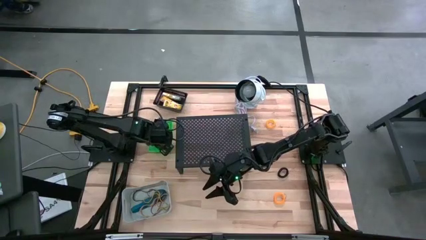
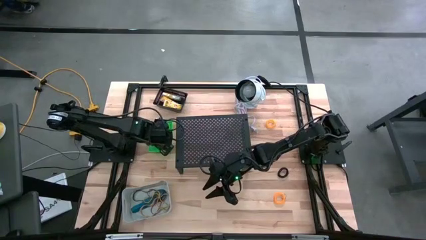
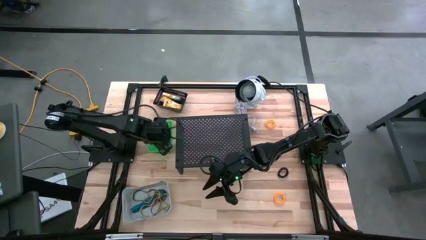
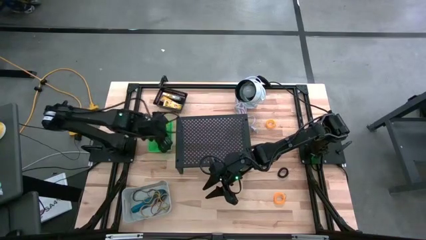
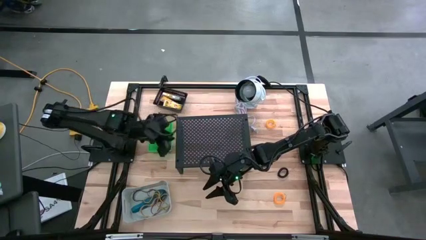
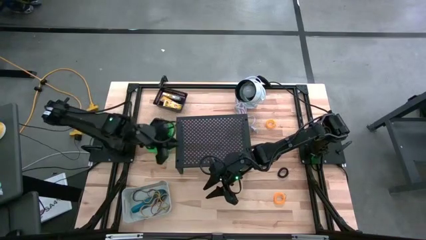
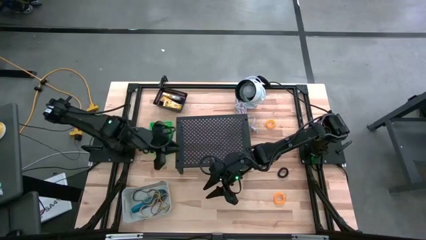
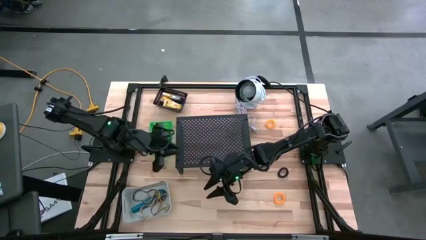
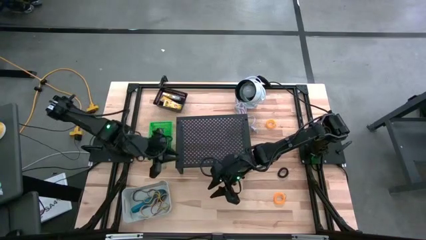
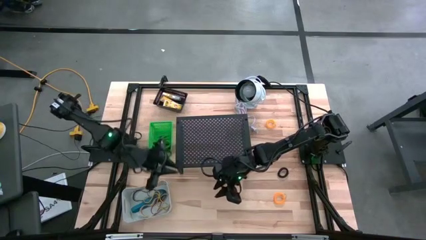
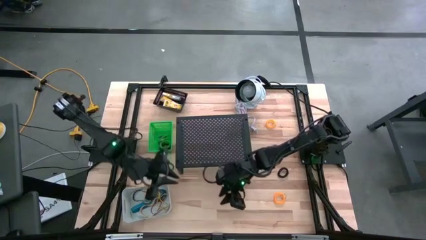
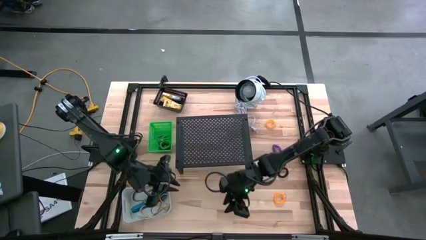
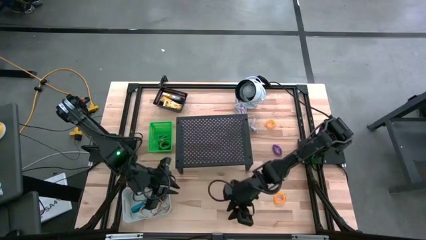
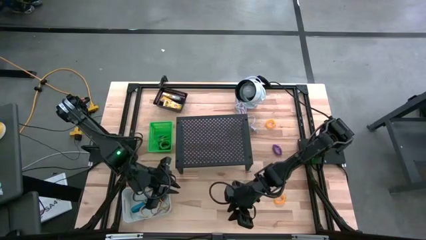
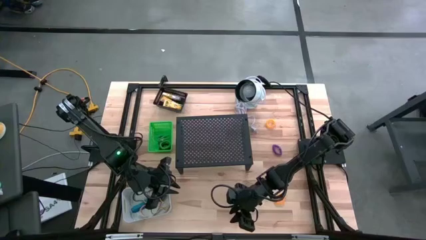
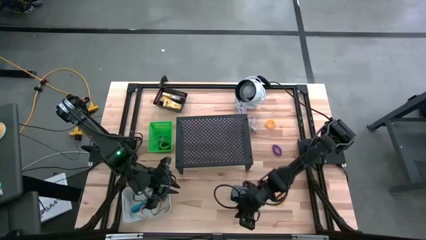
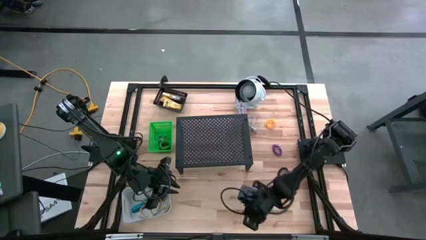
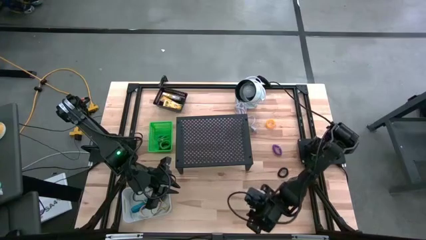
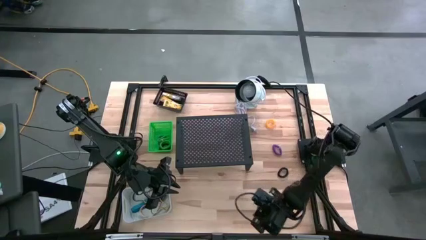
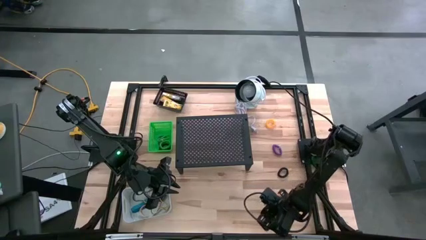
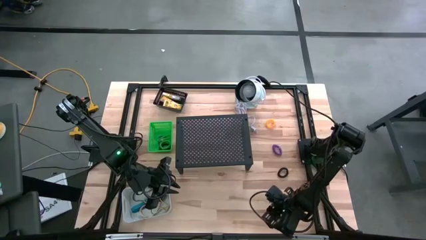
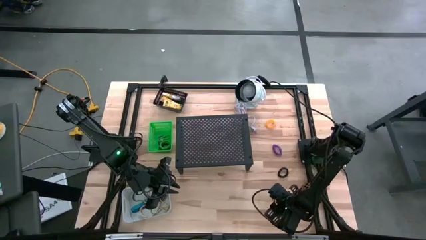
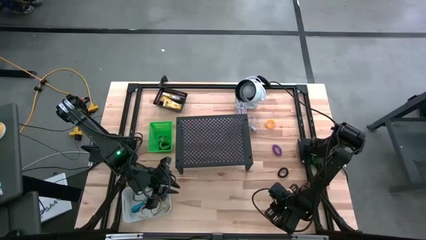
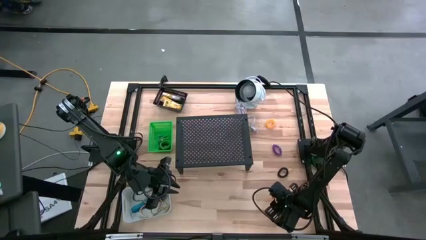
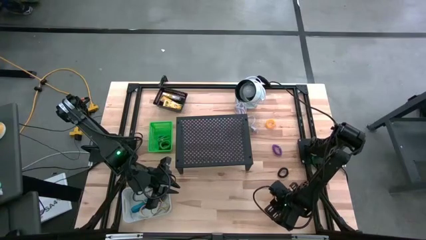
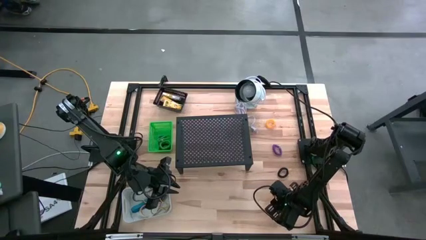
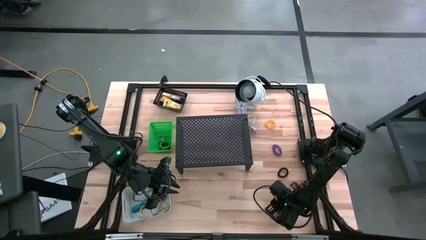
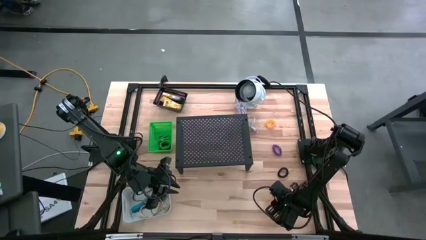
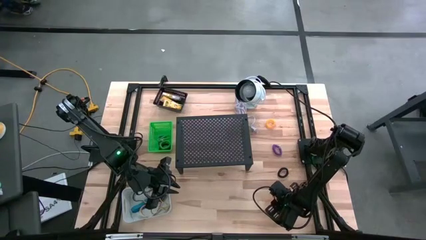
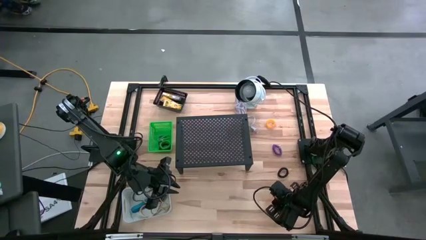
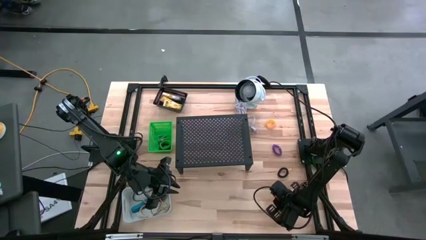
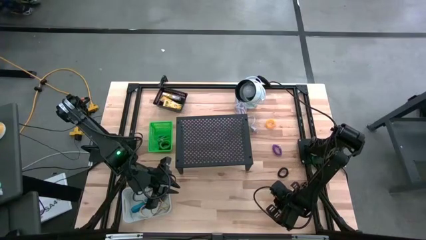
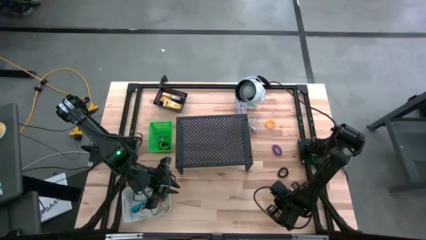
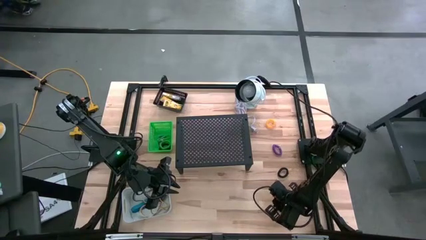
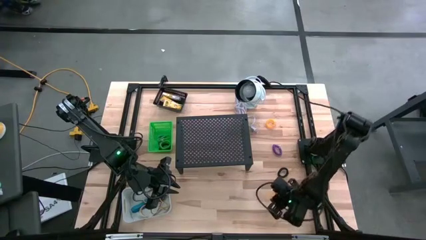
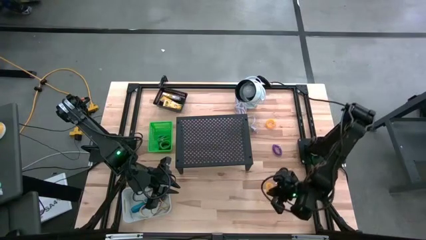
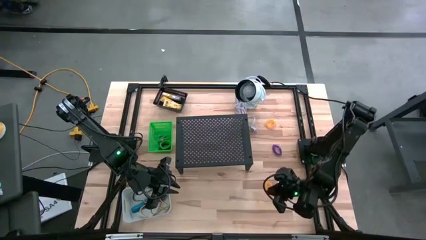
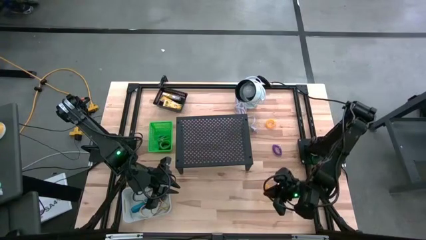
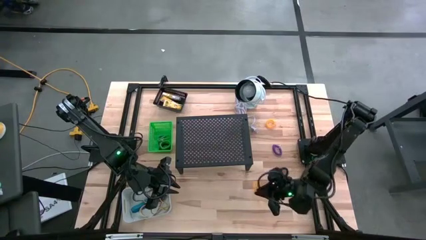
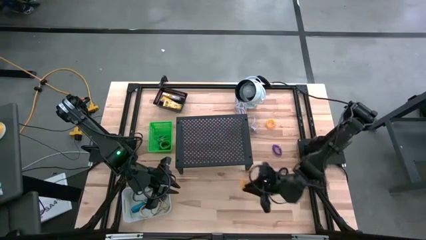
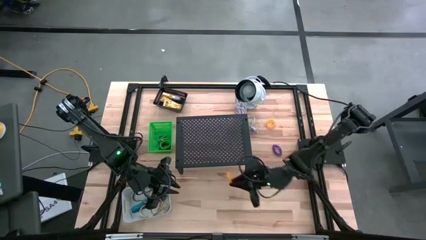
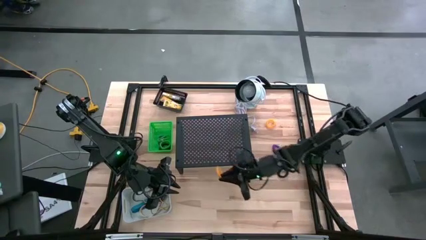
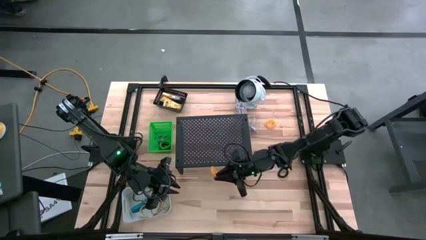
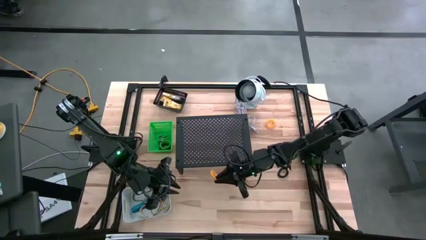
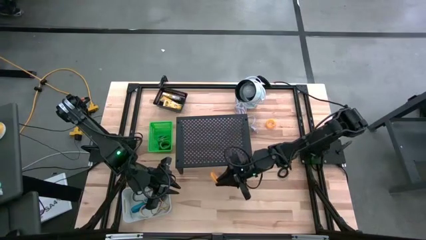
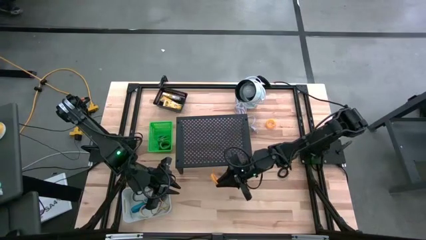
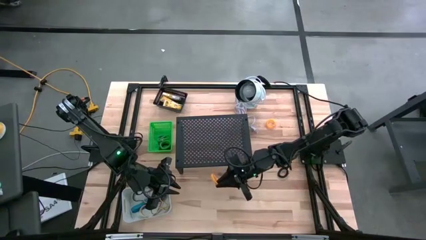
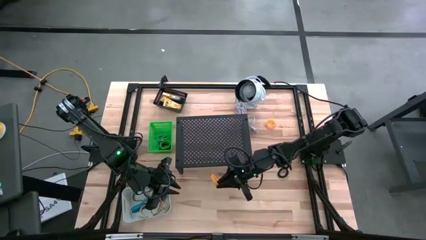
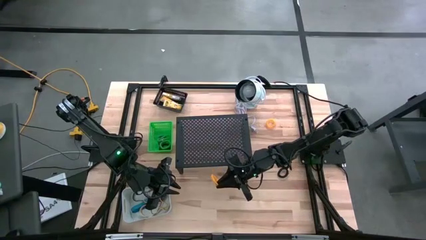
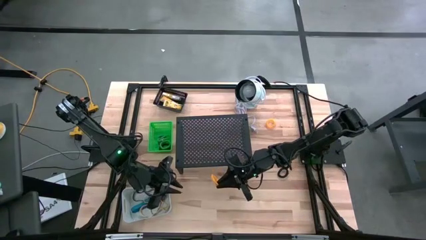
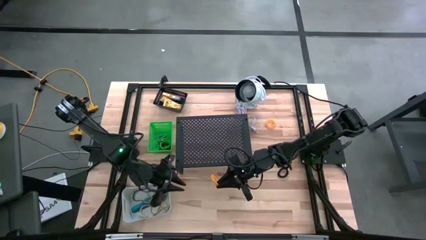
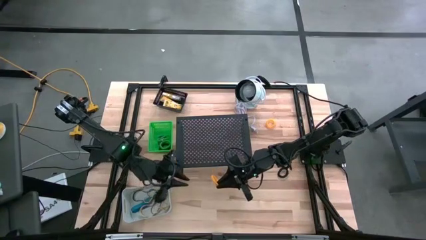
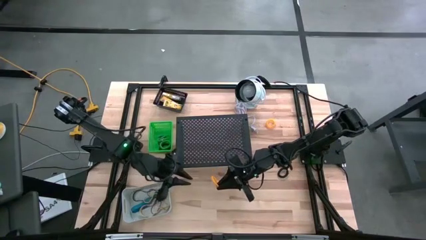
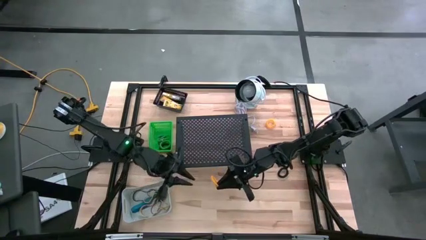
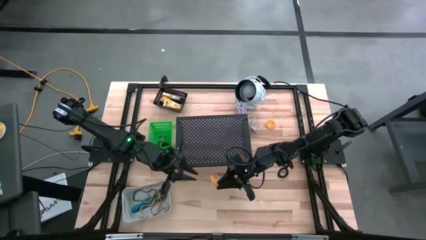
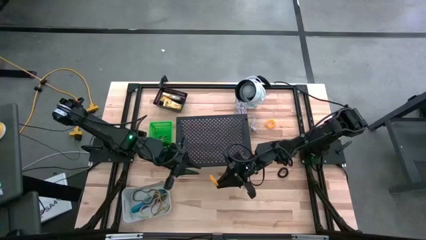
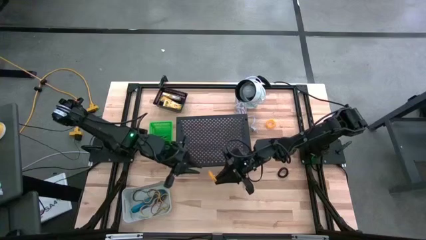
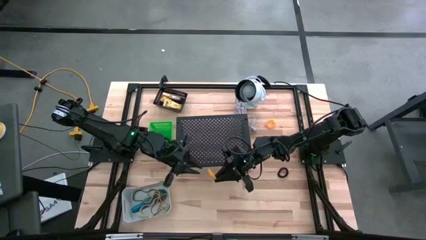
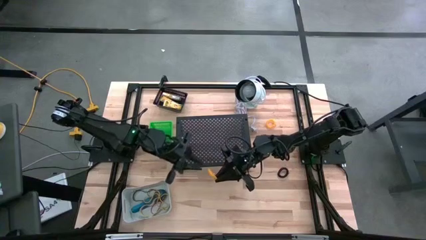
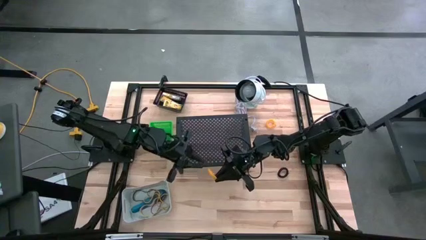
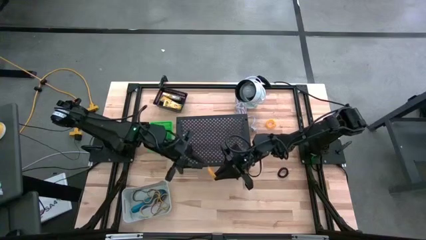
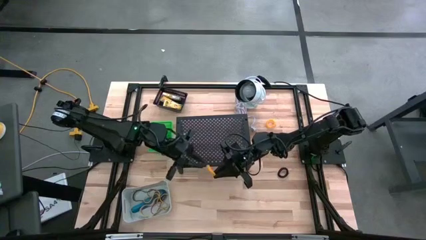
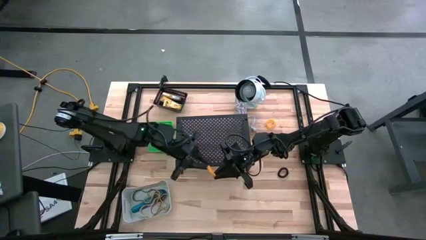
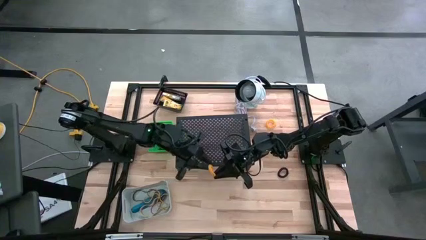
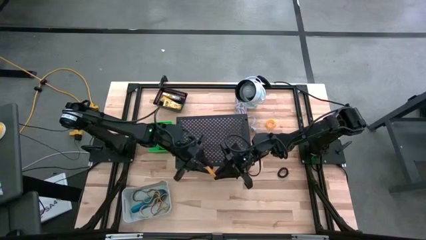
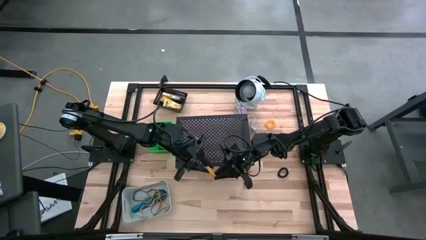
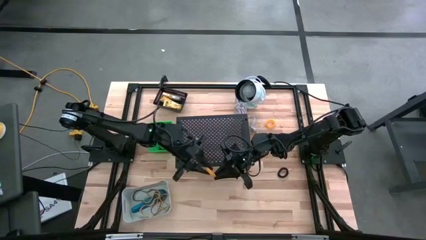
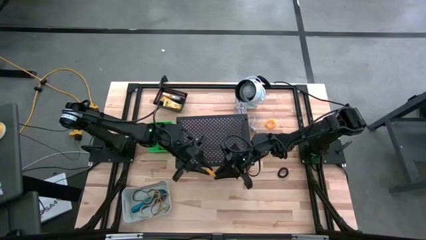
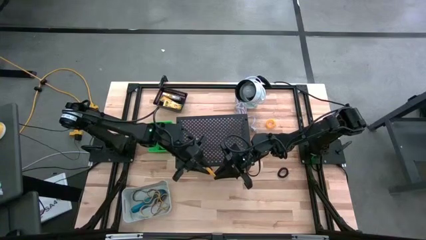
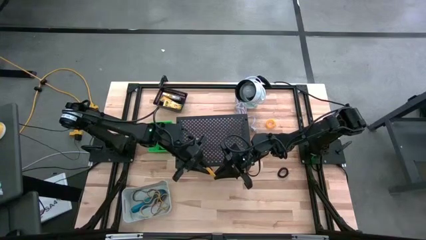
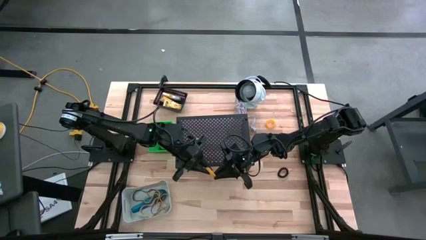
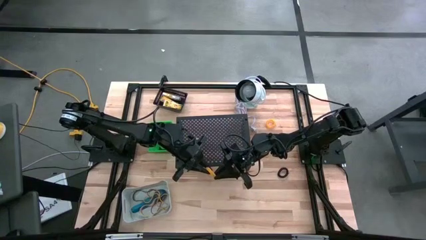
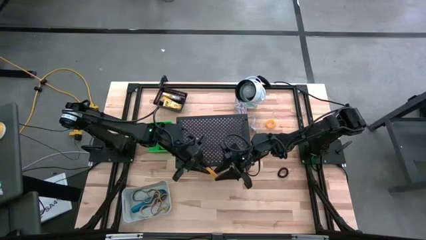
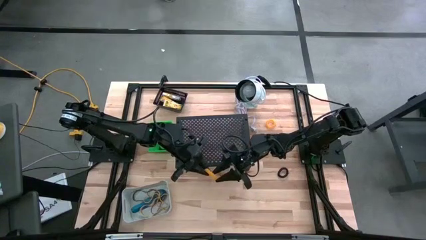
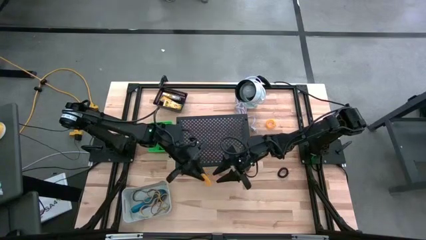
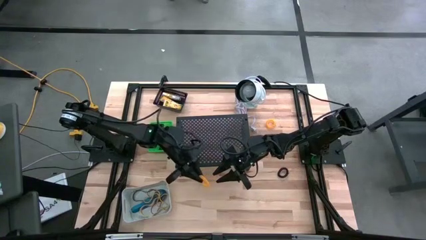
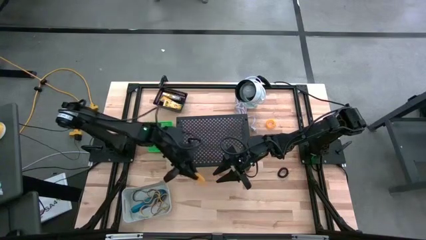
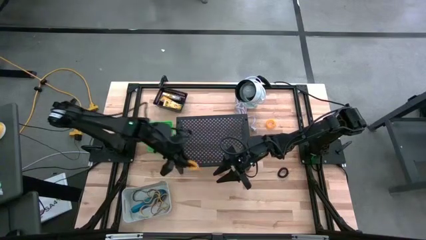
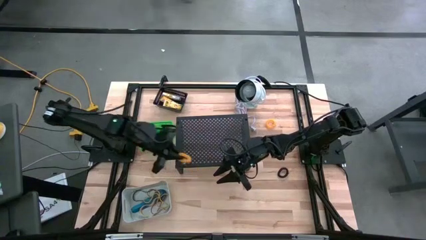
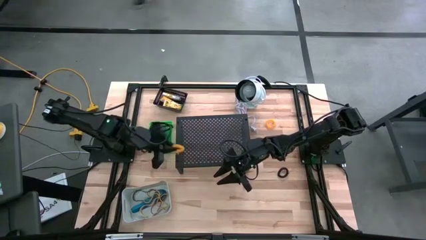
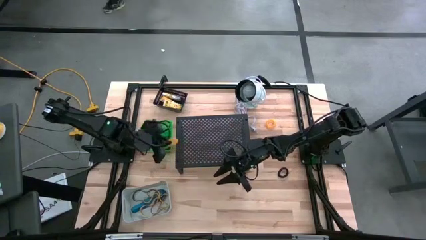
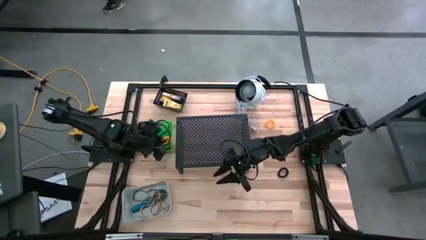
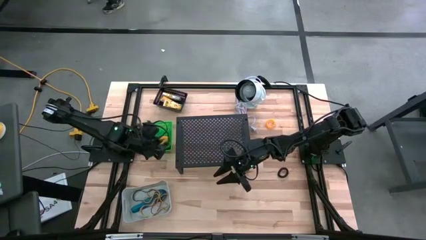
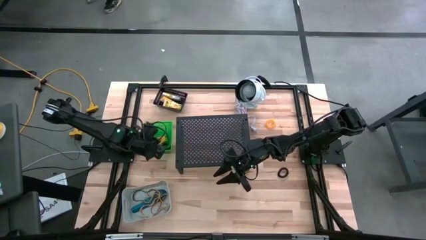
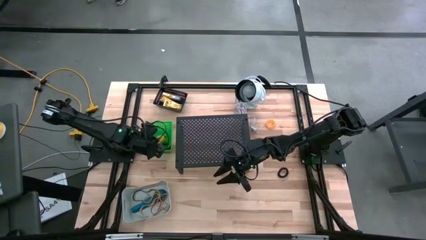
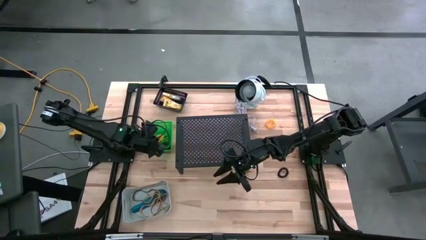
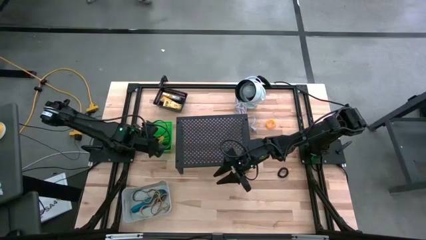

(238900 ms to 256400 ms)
Task: Pick & Place Office Desk Supplies
Put the bottom yellow spring keychain into the green bin

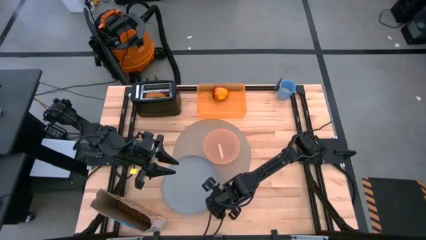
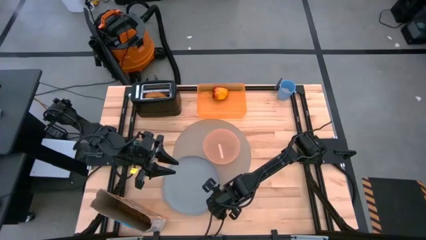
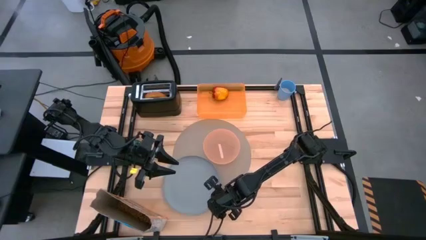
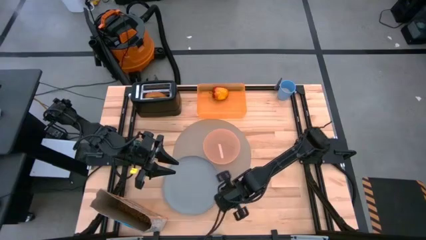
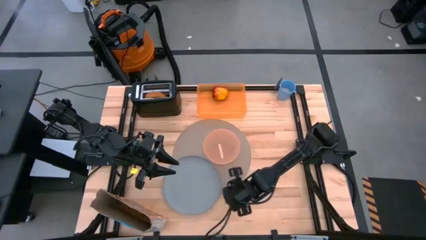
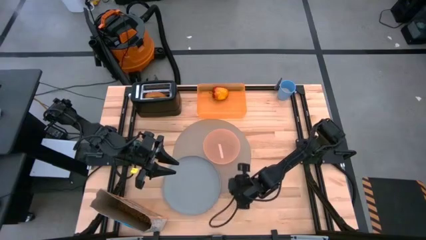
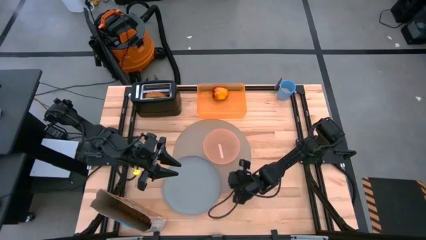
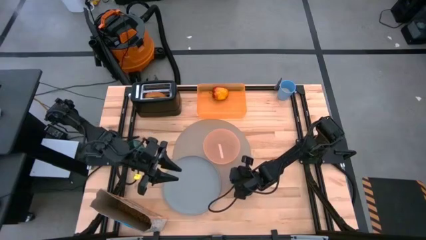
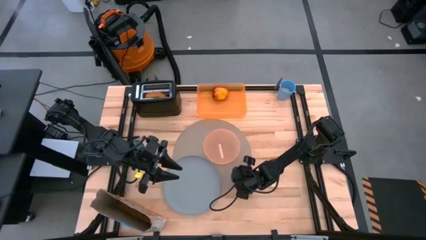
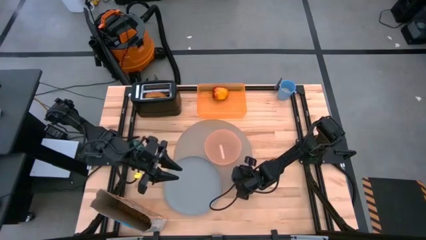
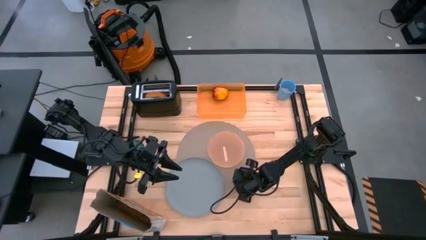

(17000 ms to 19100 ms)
Task: Arrange a breakfast setting
Adjust the gray placemat
